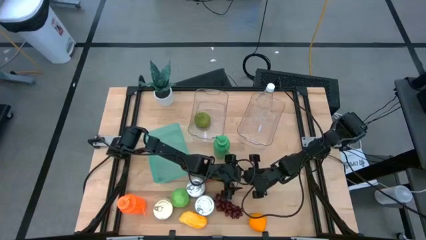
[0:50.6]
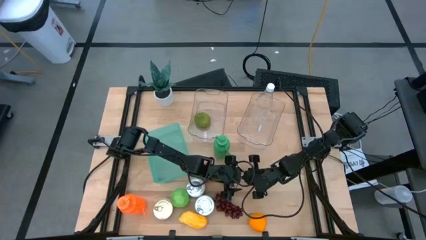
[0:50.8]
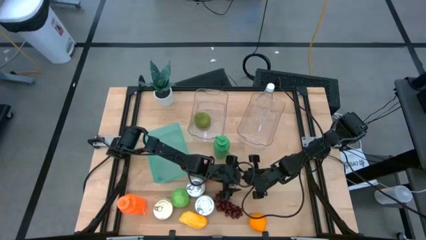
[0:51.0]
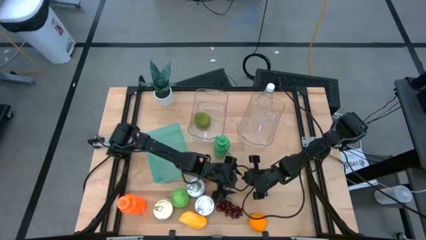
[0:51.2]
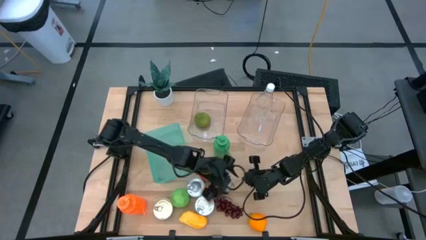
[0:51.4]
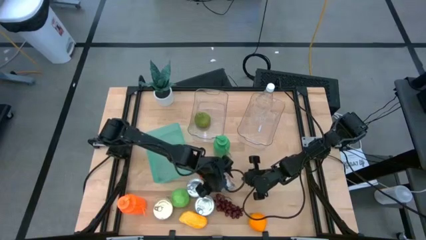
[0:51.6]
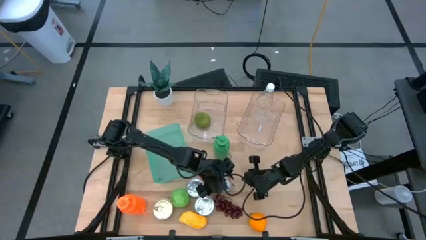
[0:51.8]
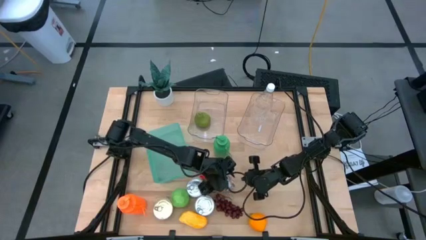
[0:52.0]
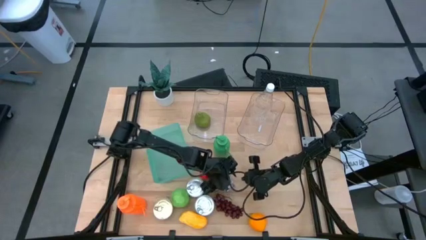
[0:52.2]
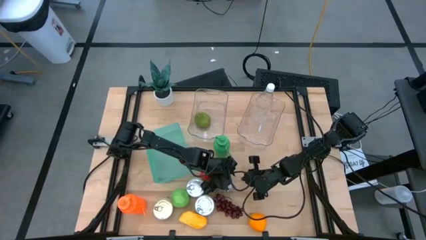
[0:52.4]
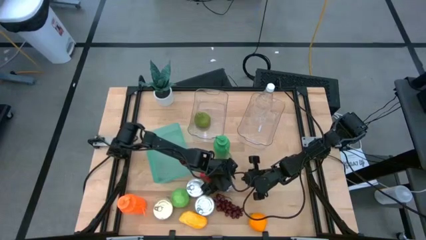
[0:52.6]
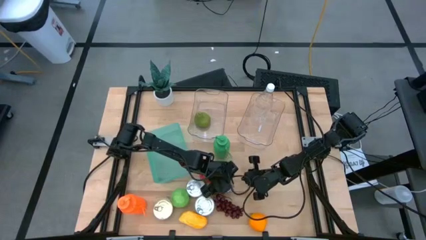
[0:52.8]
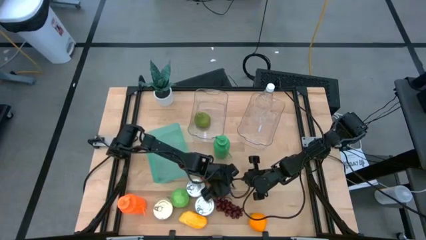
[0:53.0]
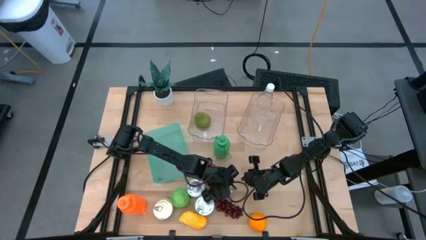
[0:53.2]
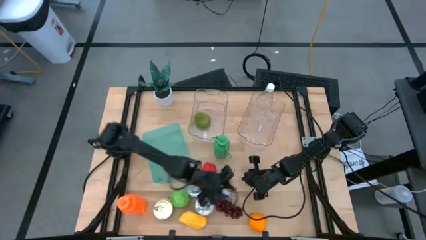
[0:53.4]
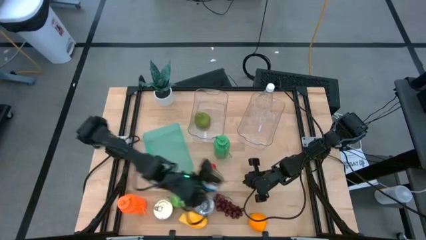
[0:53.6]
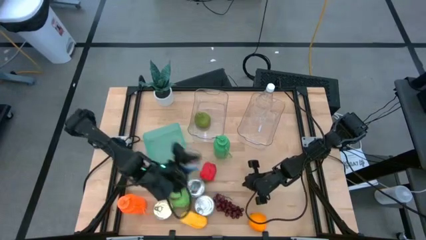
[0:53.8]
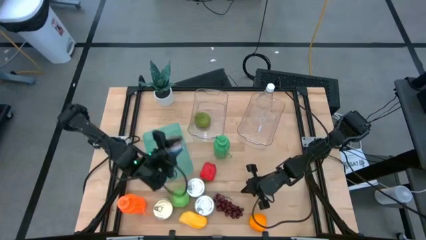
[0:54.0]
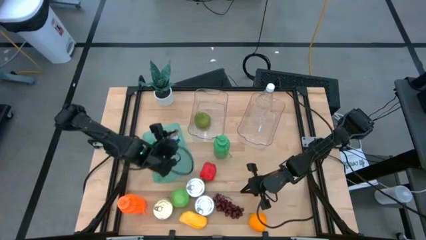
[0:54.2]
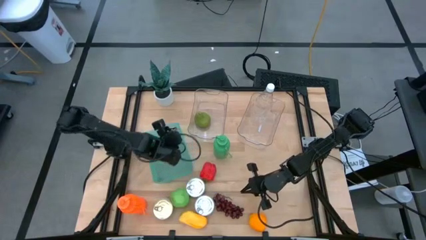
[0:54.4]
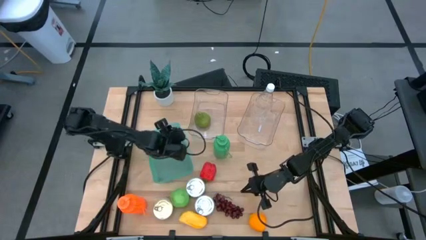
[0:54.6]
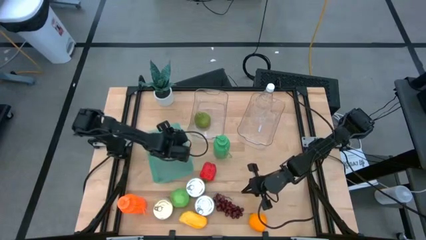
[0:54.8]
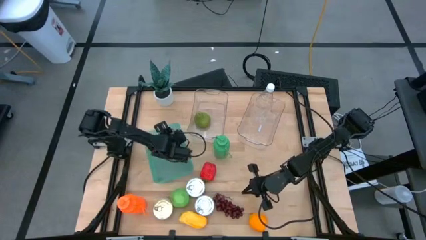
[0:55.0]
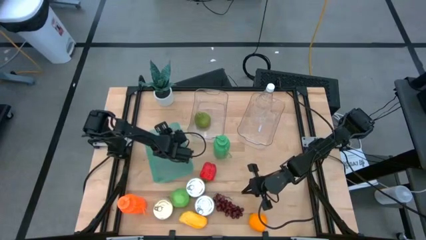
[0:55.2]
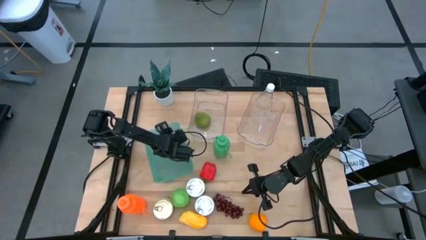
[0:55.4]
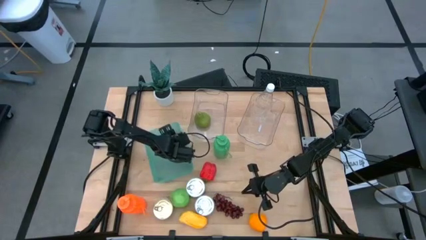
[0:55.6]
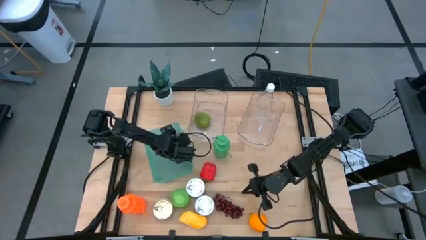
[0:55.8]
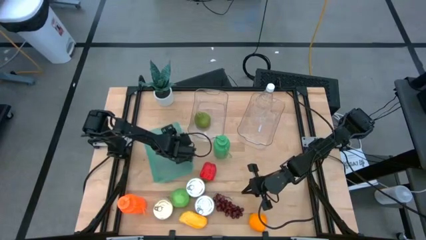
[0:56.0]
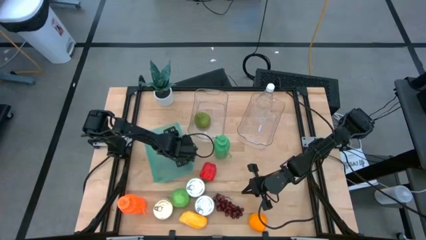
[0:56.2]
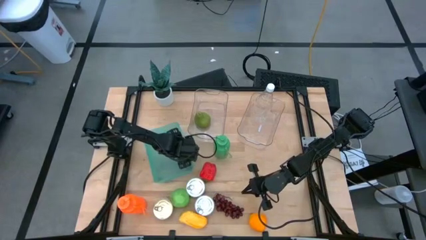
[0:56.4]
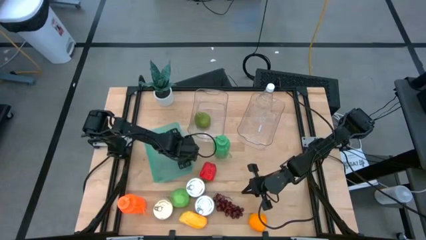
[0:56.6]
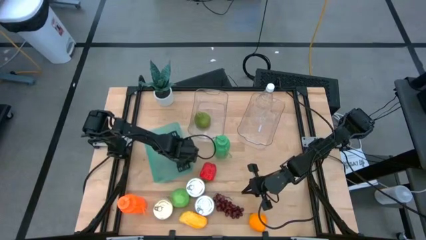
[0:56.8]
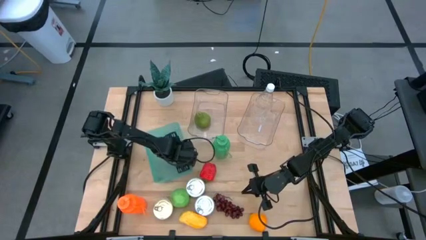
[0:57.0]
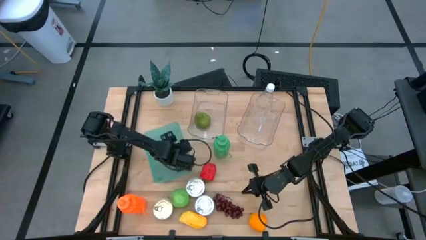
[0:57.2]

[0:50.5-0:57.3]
Task: Pick & Place Food Item
Put the top blue and pink tuna can into the green bin

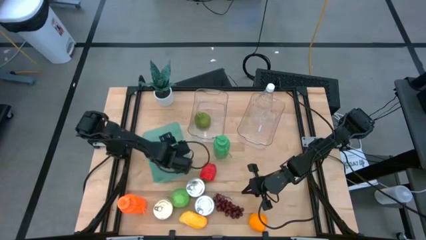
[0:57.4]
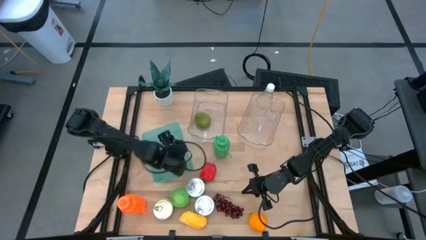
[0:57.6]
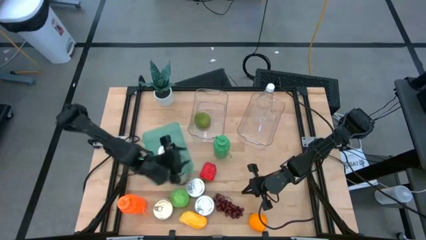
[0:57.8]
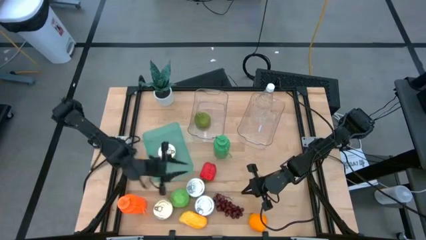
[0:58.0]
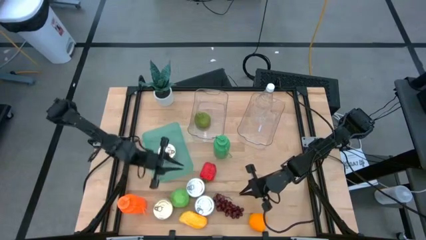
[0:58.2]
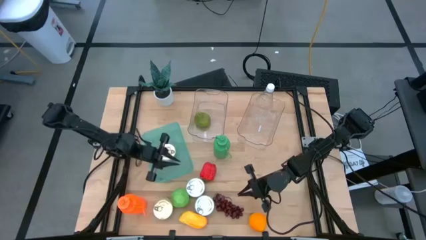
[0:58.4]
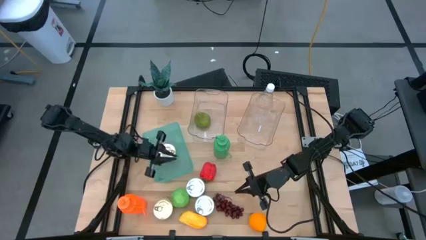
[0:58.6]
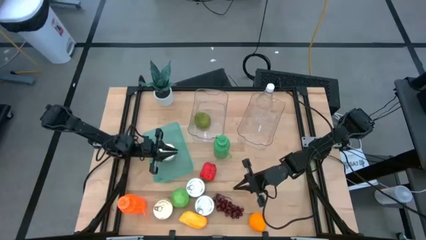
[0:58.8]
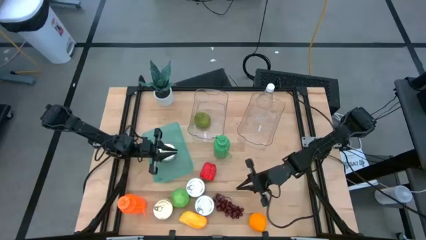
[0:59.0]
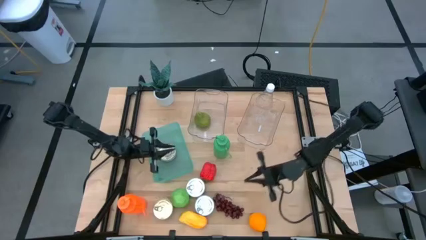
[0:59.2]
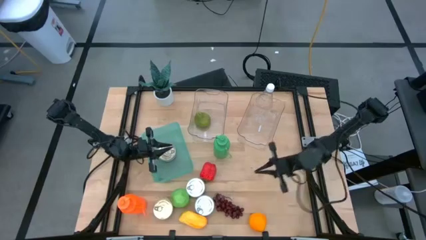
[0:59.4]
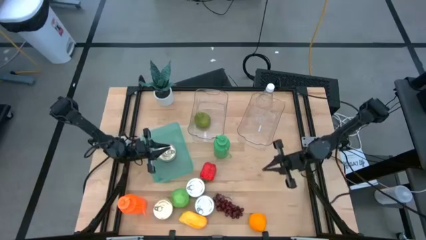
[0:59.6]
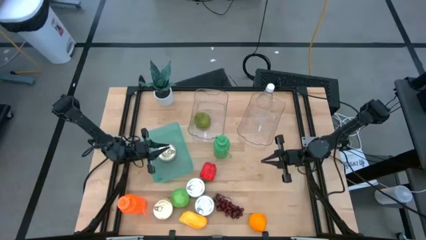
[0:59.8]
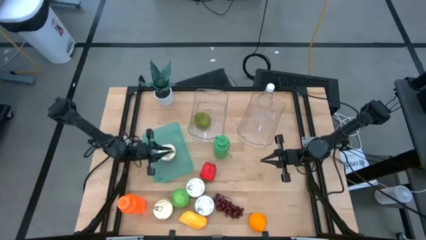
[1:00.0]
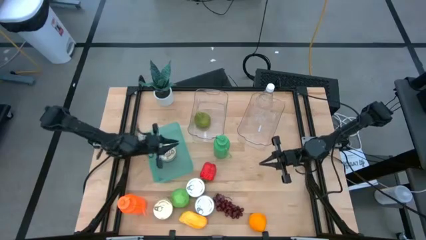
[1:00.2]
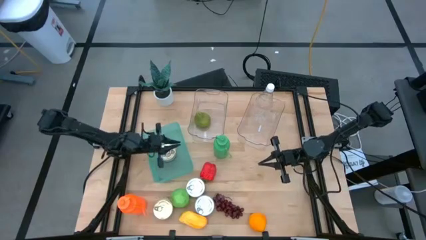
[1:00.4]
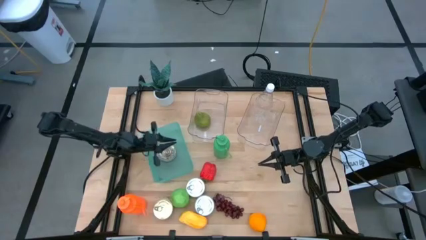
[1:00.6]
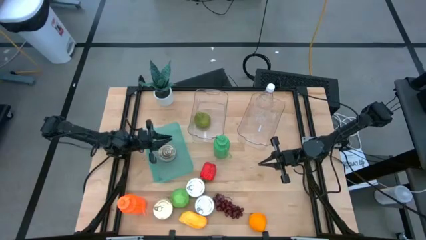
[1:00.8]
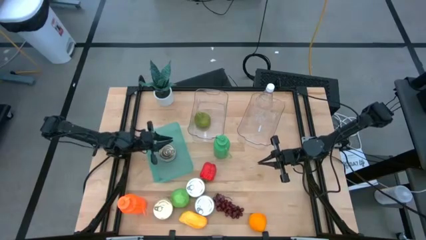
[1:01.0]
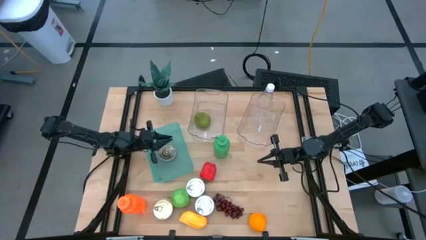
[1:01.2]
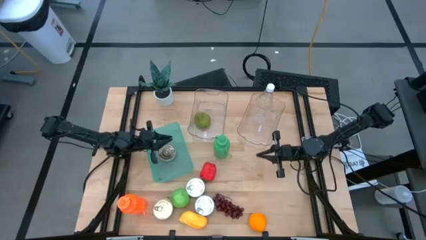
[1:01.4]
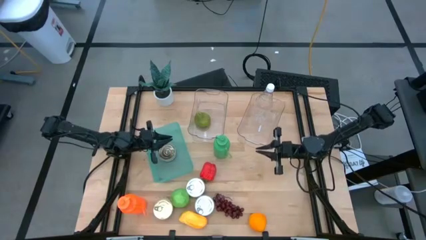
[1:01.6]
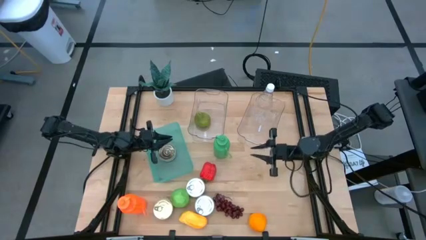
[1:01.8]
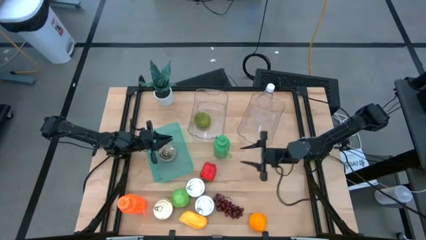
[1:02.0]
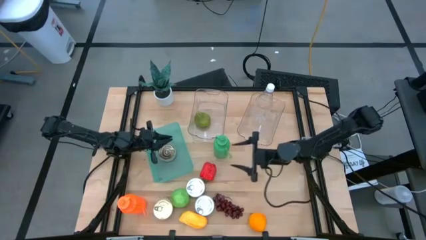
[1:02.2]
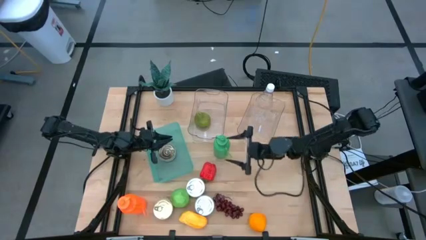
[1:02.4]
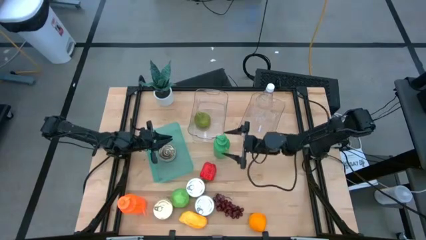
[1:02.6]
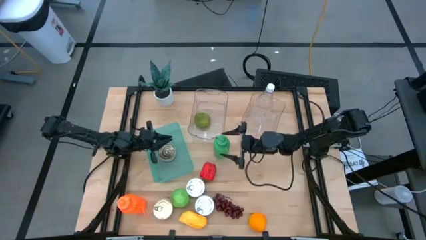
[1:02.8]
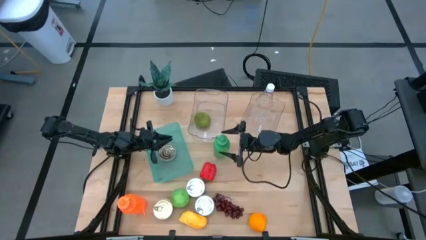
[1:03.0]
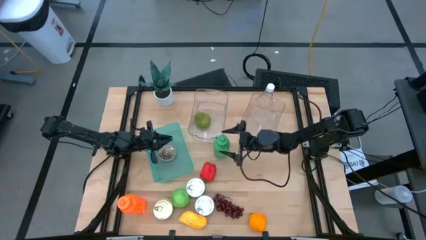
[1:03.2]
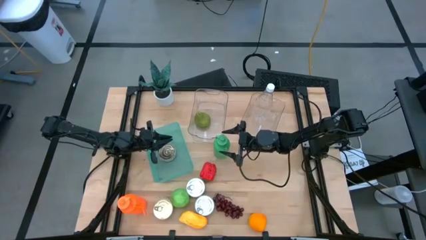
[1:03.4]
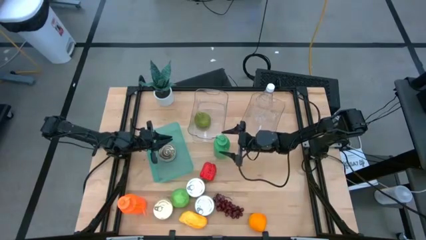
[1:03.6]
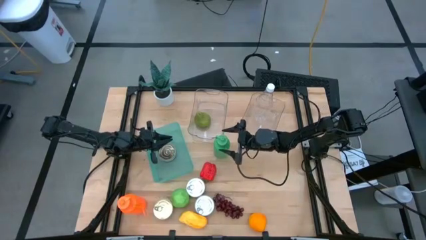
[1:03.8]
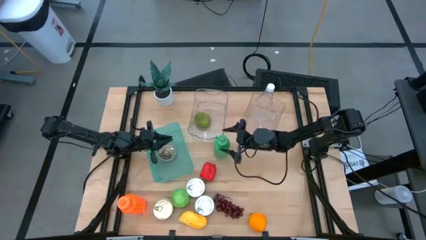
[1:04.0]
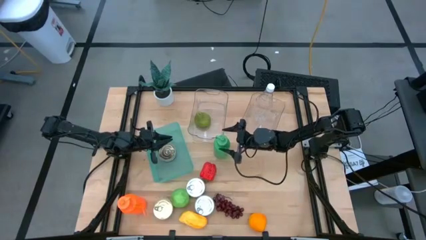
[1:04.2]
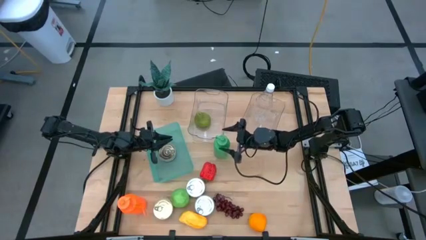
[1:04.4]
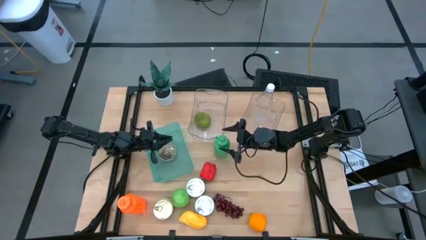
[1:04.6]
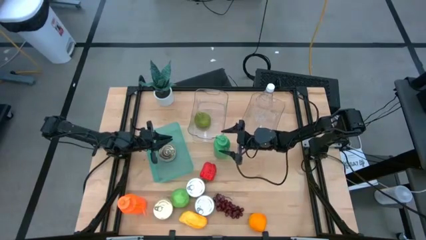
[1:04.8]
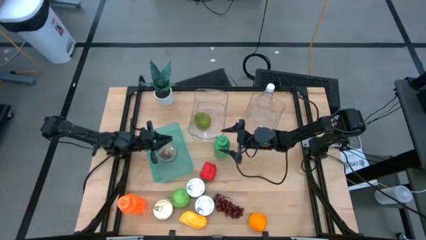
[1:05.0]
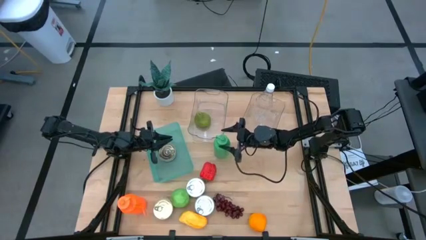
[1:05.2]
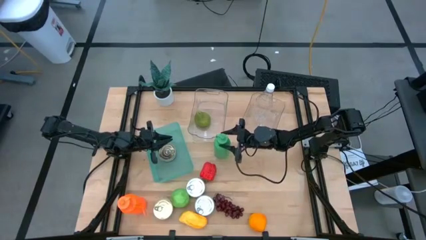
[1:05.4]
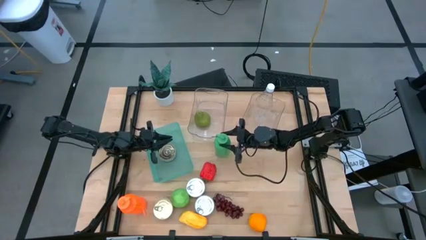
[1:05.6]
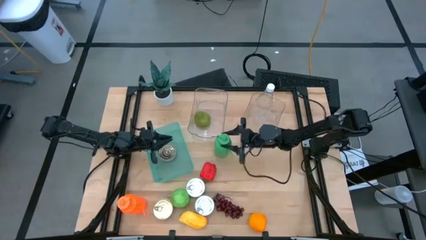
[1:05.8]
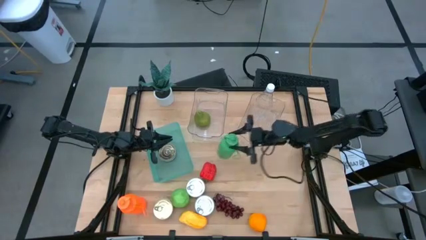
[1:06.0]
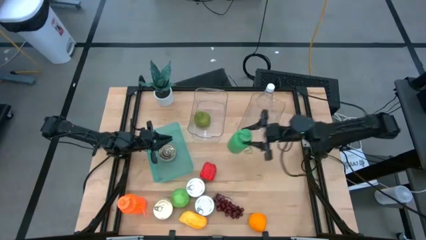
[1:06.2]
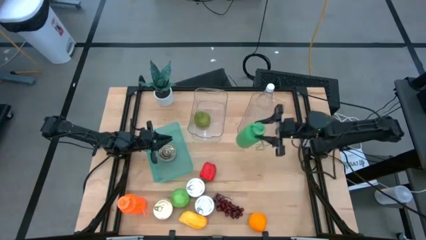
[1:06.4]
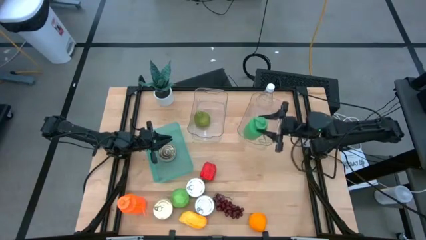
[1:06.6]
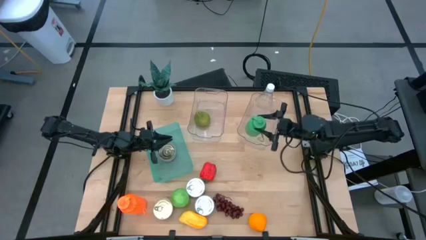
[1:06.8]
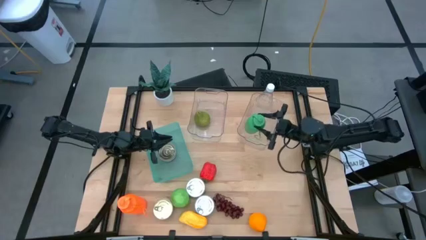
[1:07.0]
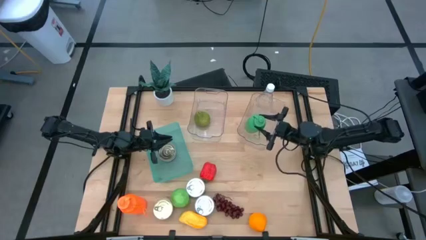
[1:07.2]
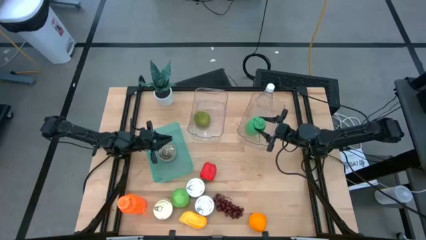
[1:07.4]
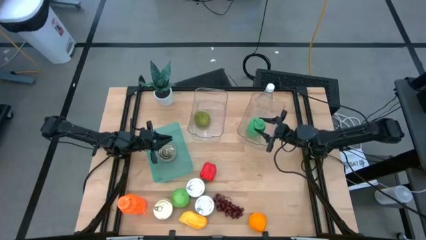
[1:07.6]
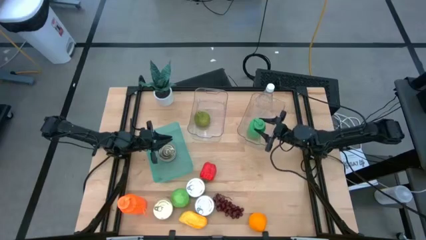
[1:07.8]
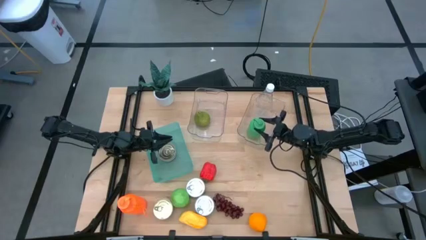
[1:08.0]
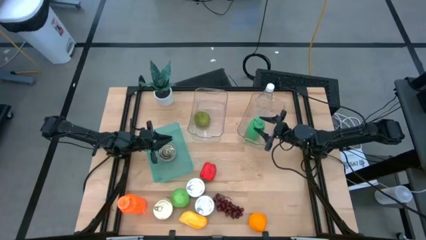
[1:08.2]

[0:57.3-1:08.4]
Put the green water bottle into the right transparent bin
